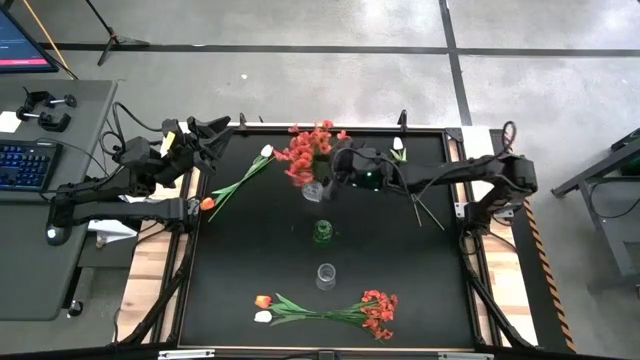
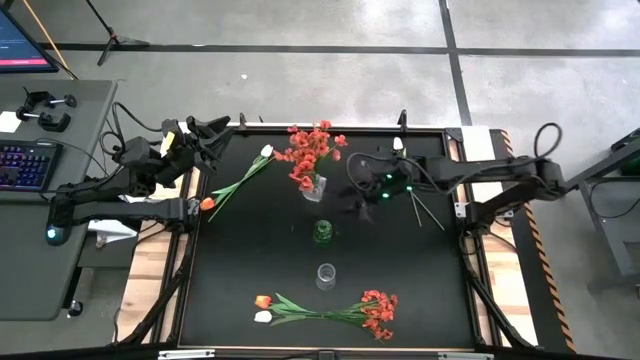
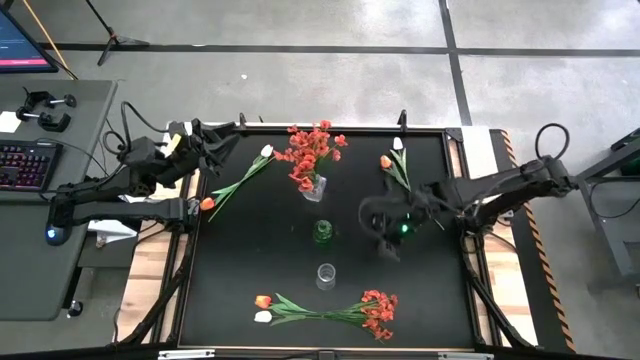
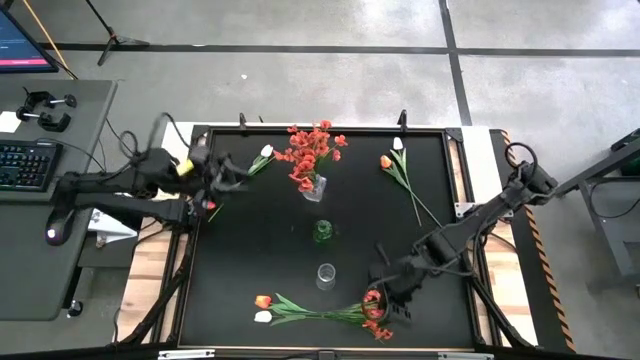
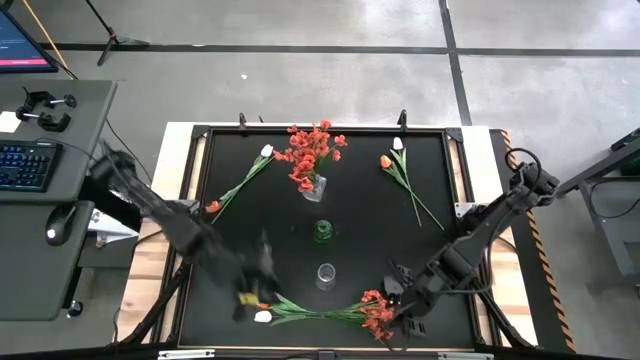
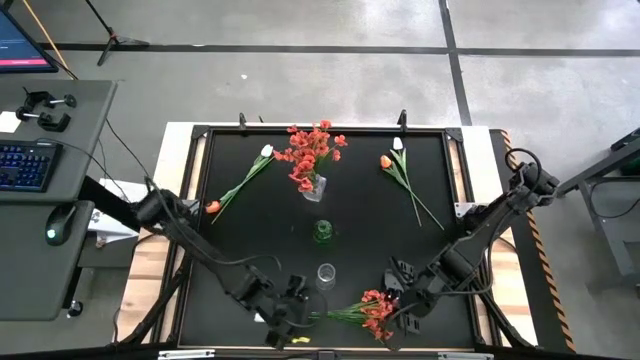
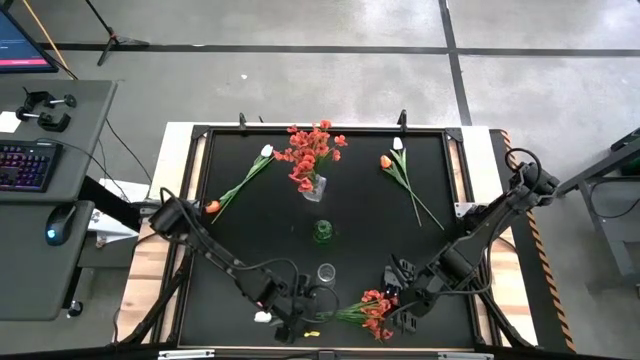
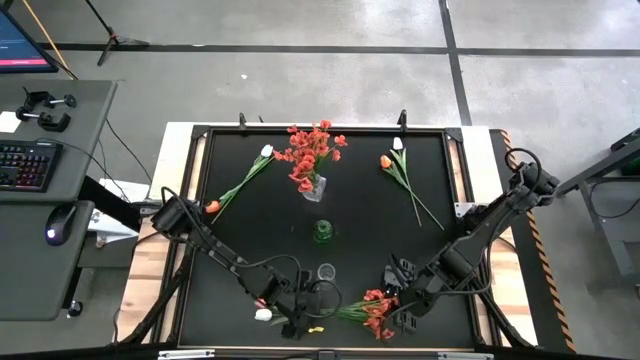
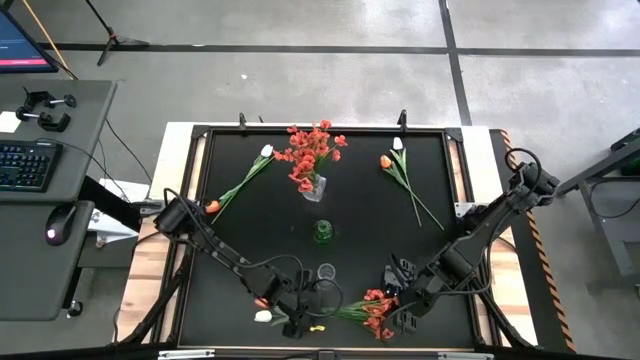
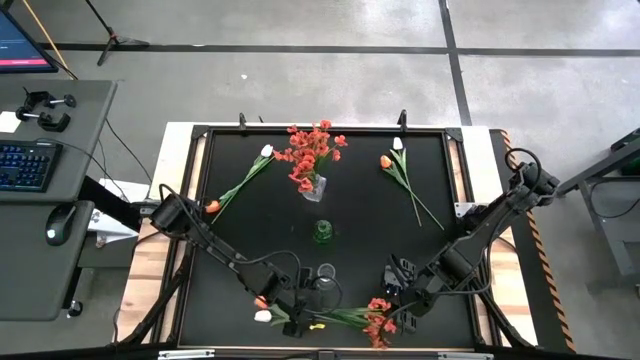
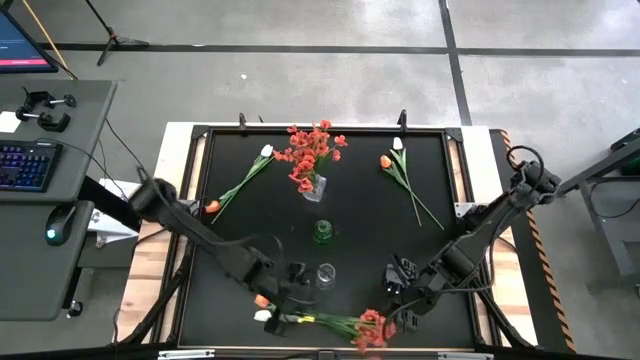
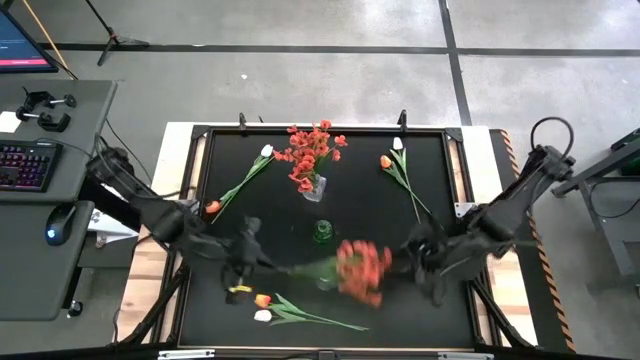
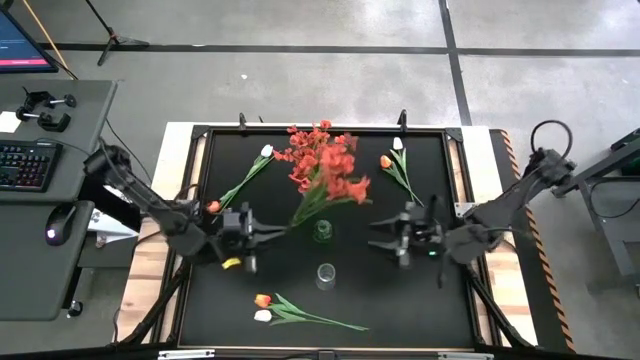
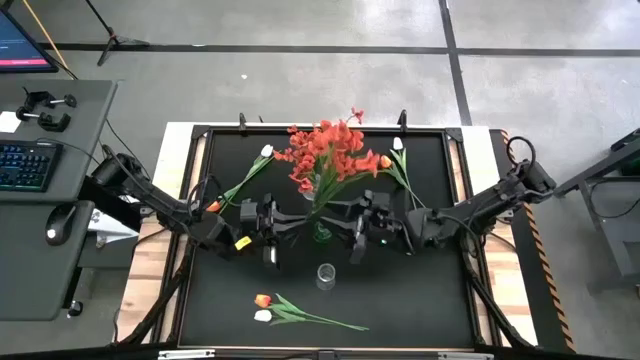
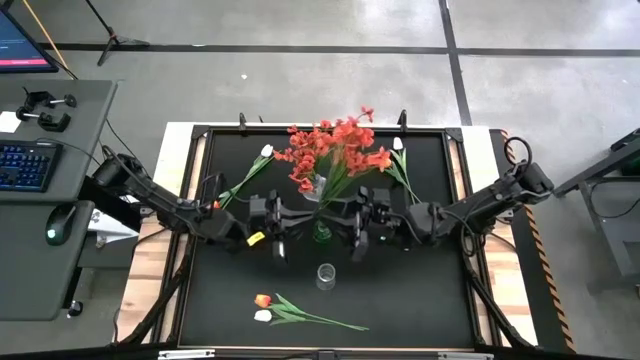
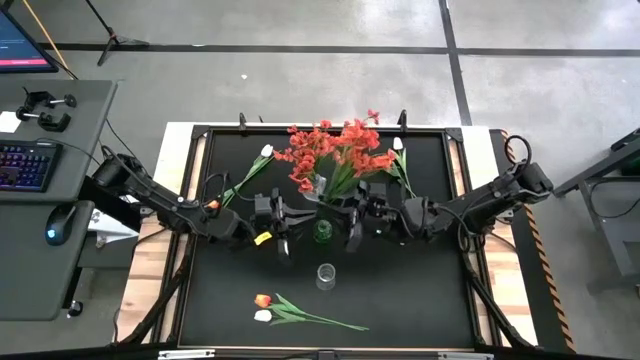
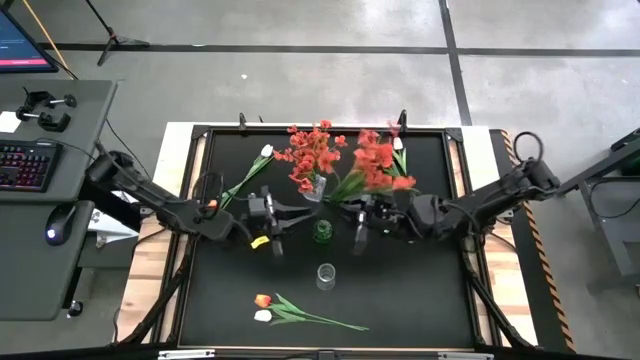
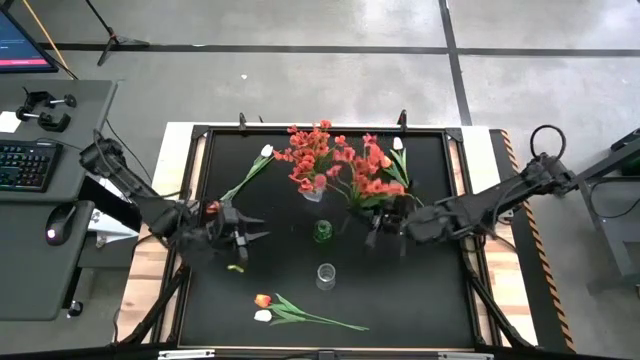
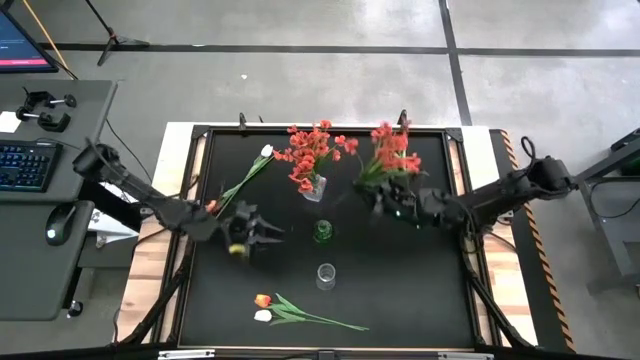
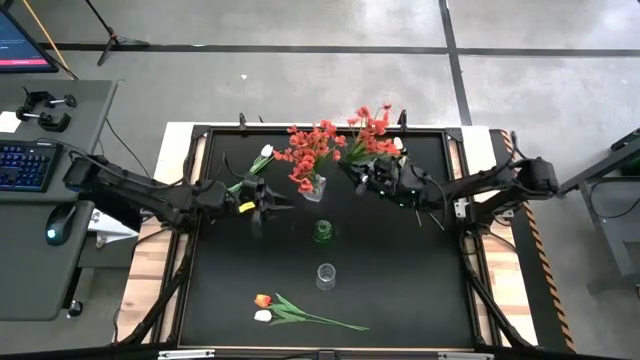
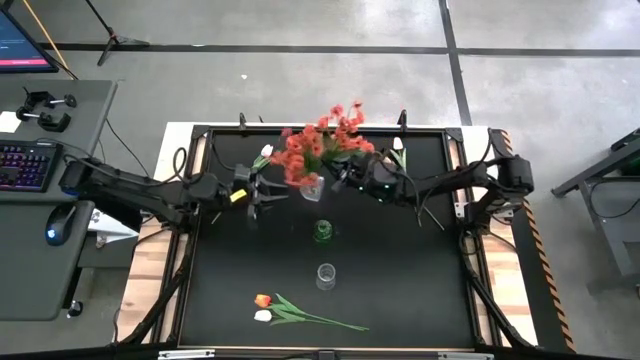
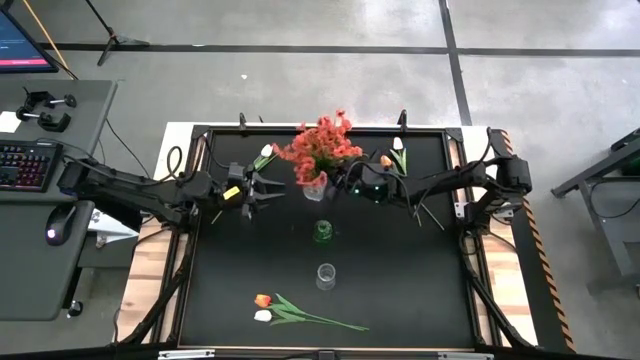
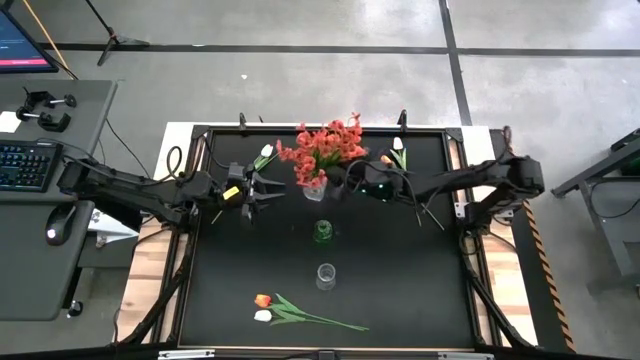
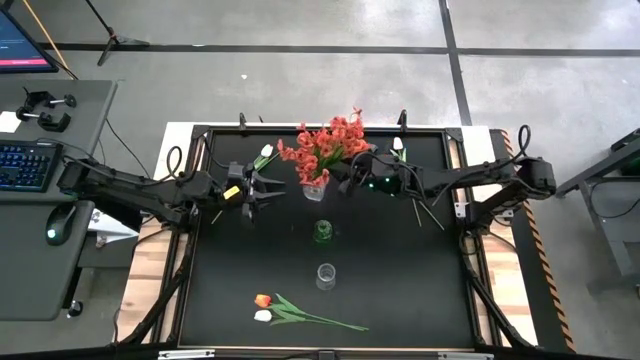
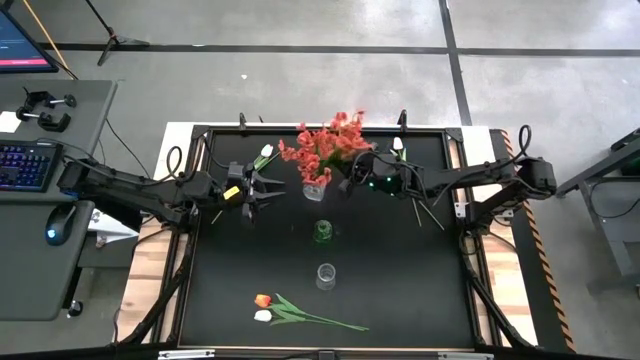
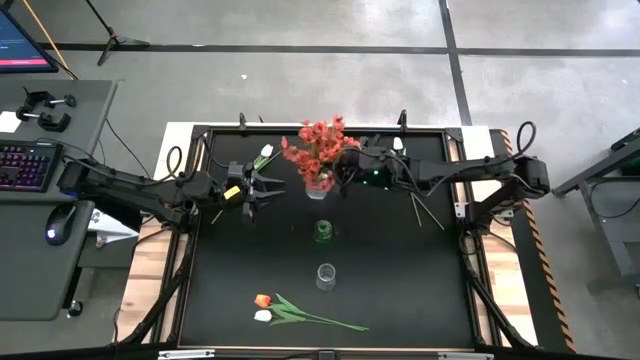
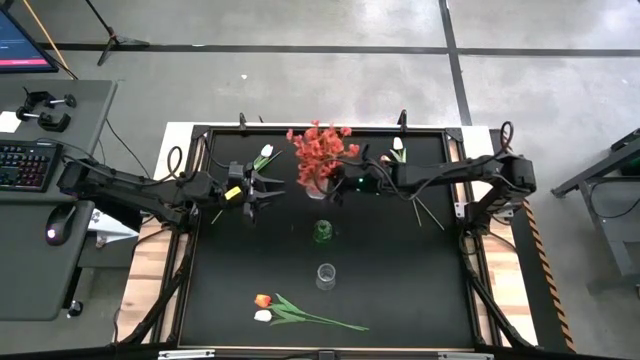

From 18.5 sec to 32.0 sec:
Task: Sort flowers into vase by color
Put the orange flowers into the top transparent flower vase

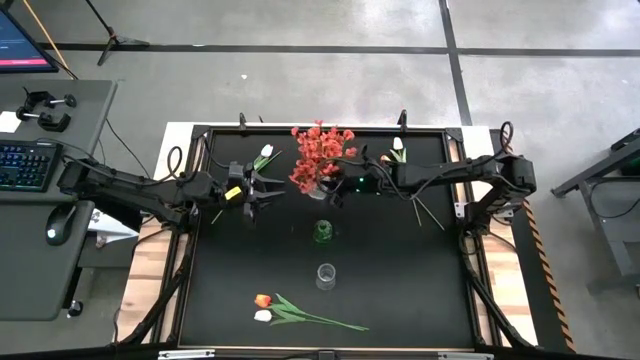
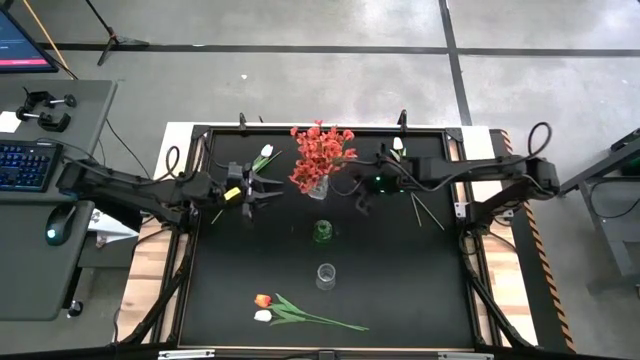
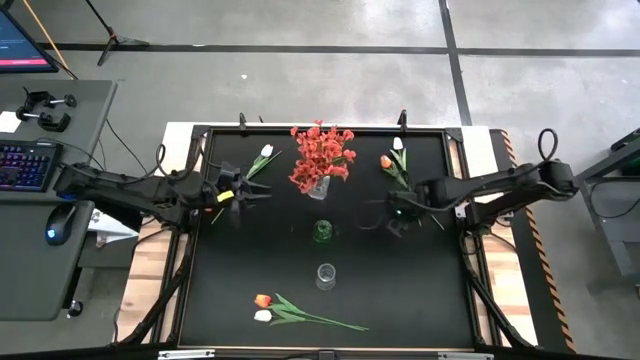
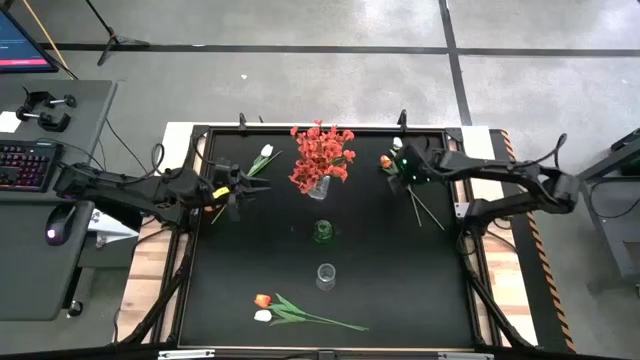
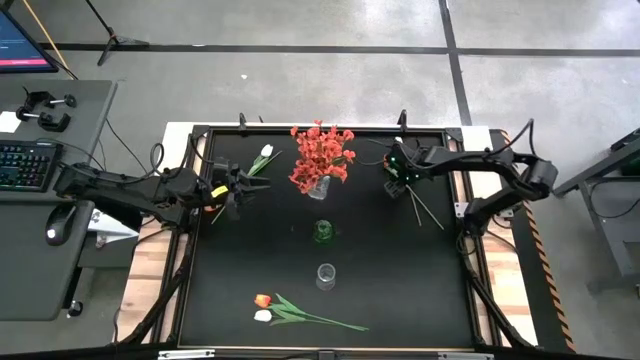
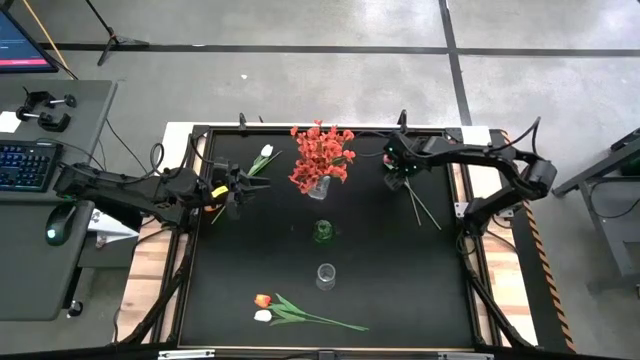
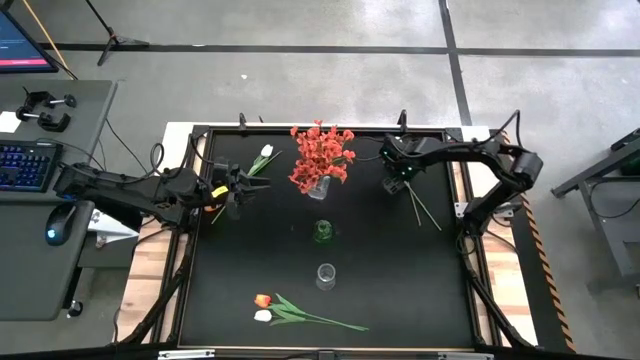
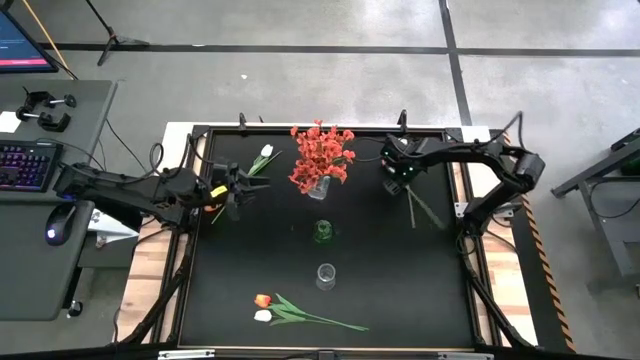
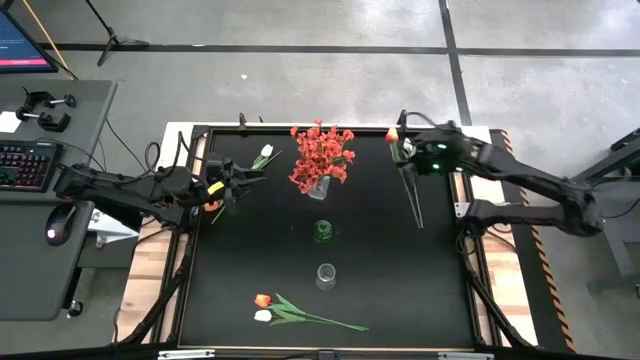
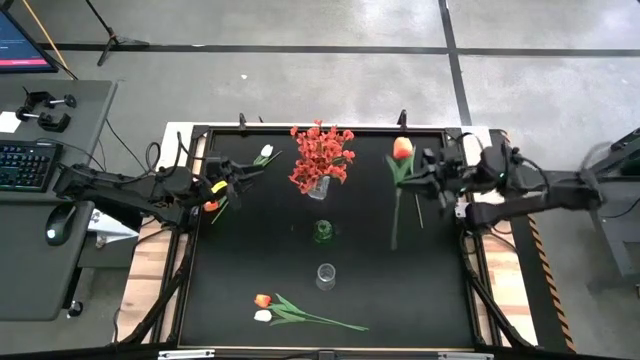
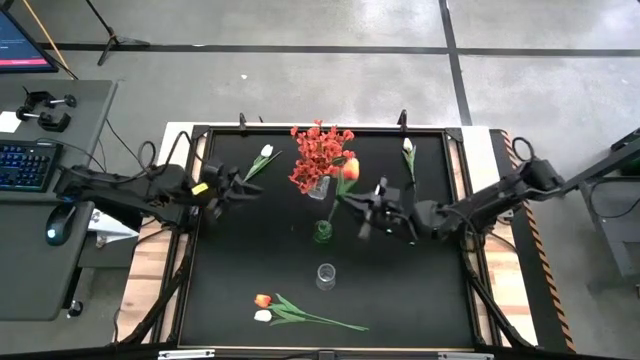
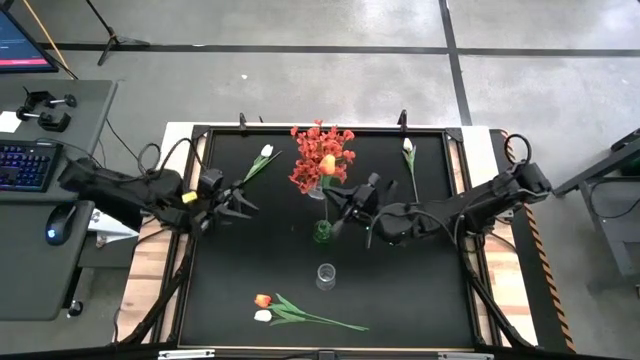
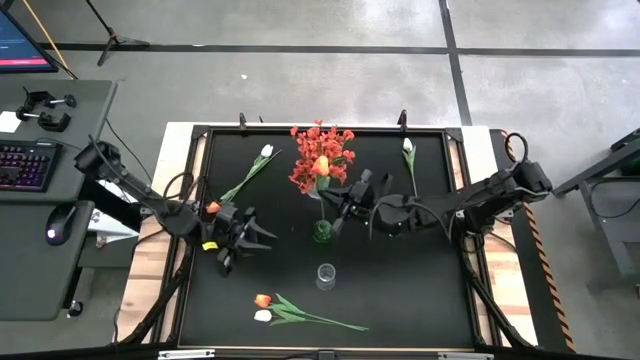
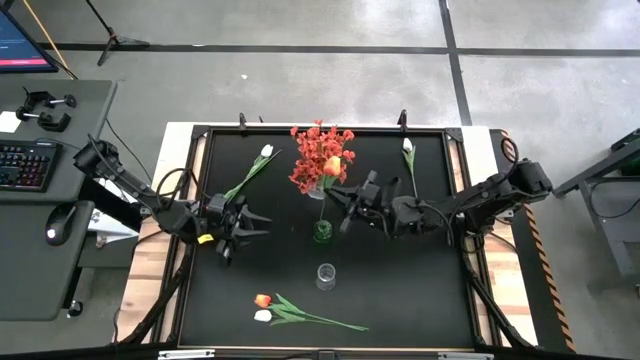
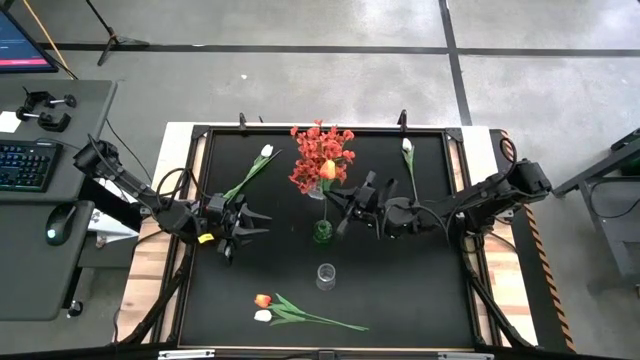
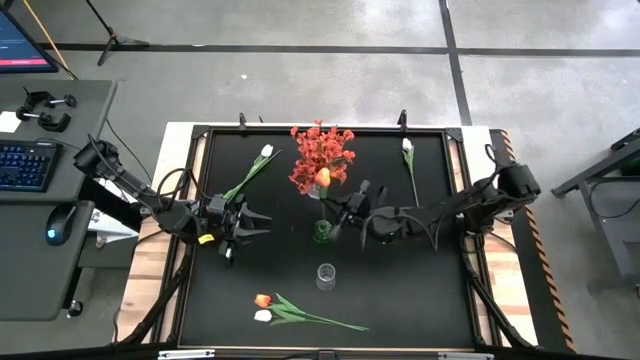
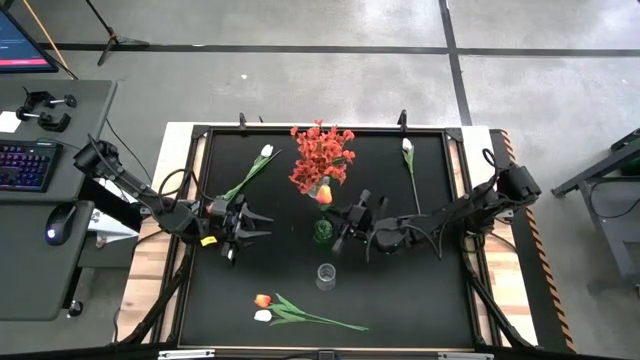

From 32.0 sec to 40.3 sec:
Put the top right orange tulip into the green flower vase
